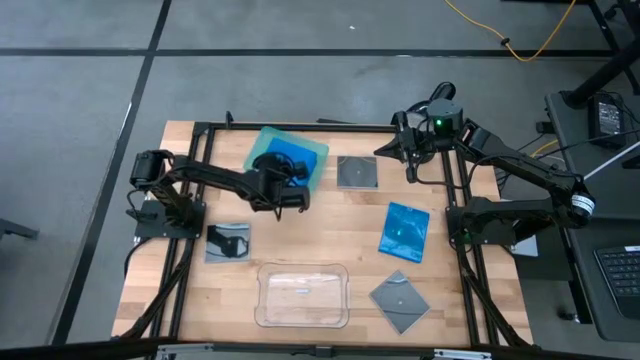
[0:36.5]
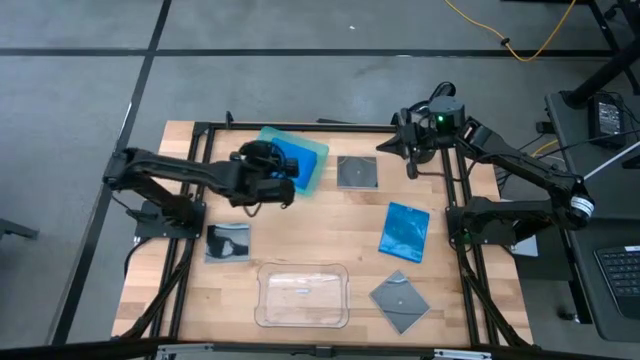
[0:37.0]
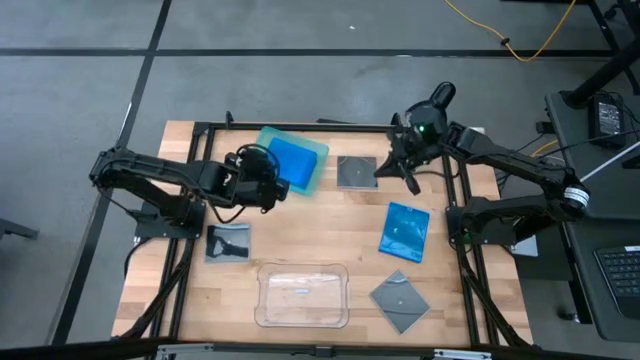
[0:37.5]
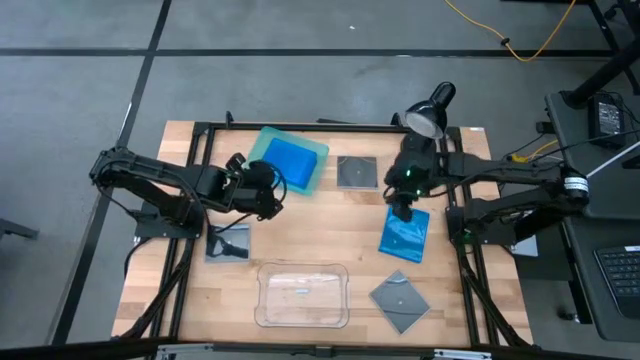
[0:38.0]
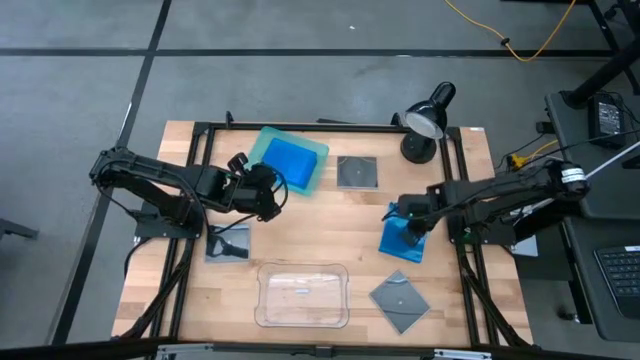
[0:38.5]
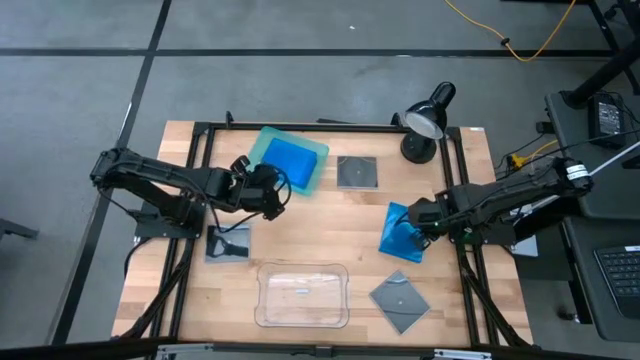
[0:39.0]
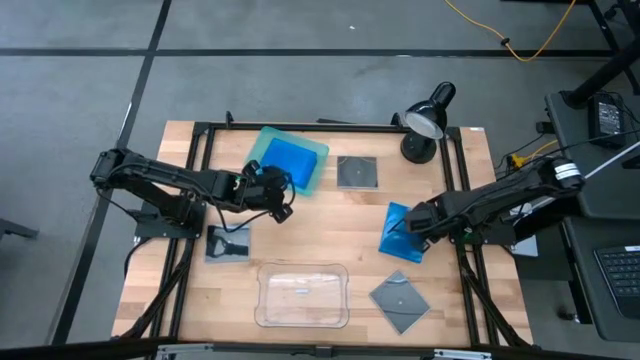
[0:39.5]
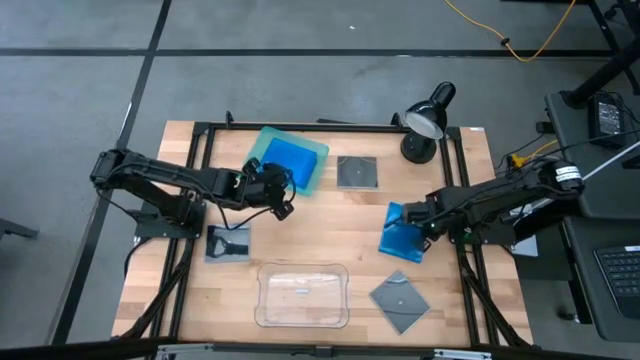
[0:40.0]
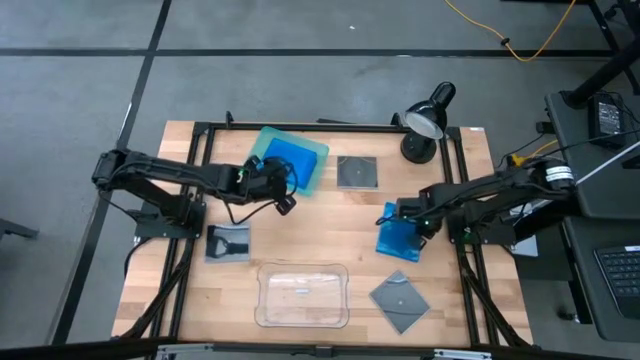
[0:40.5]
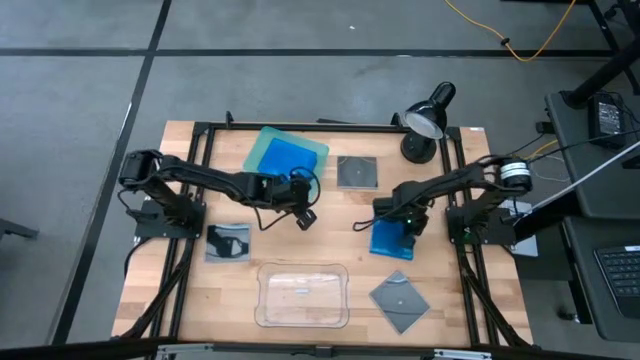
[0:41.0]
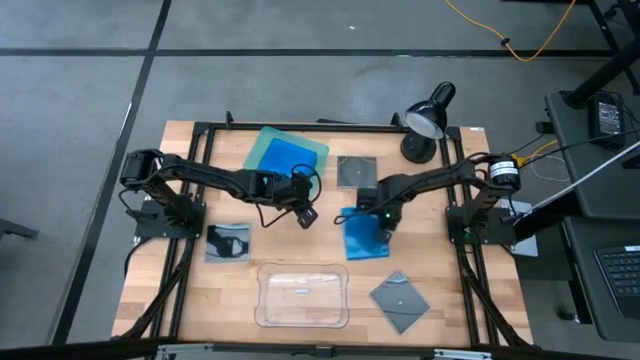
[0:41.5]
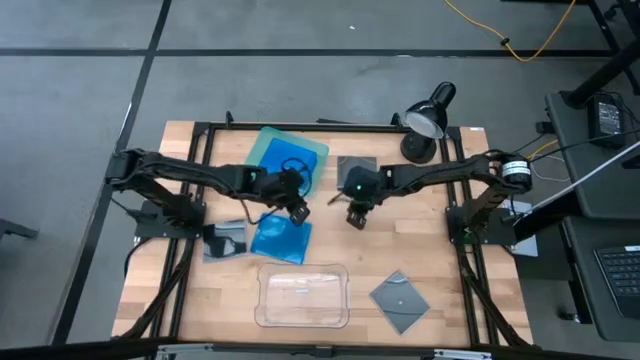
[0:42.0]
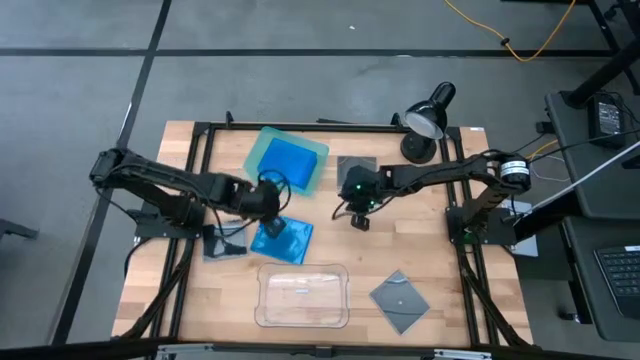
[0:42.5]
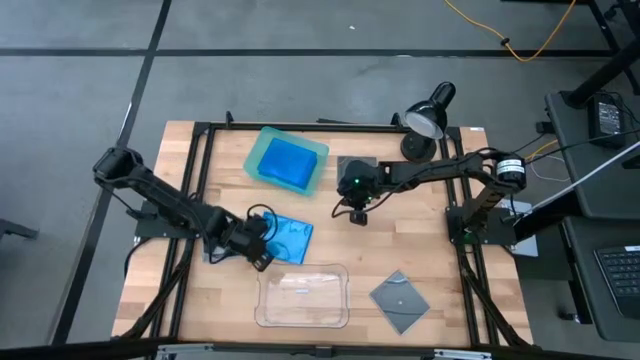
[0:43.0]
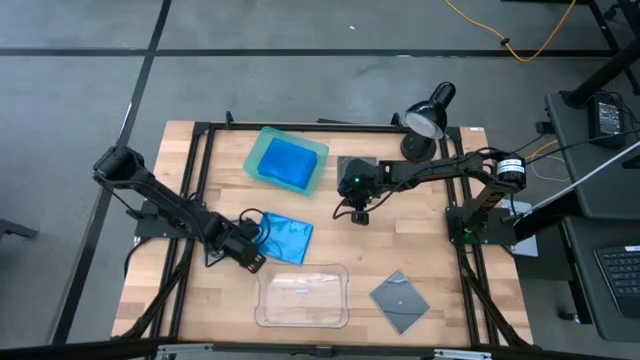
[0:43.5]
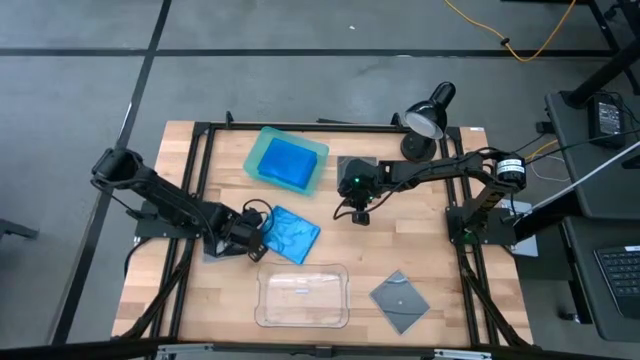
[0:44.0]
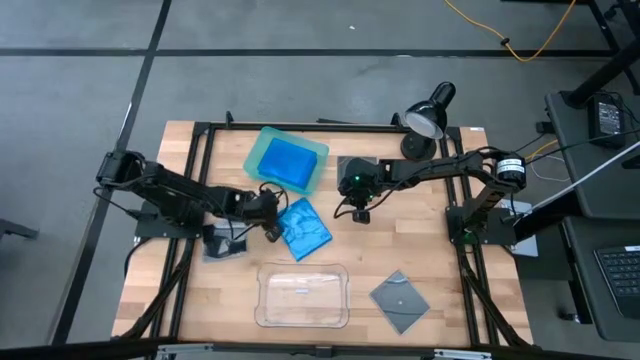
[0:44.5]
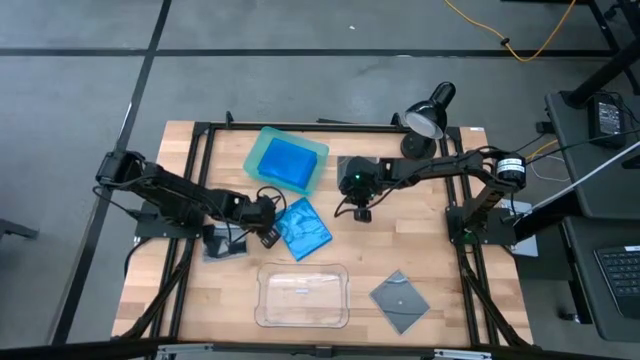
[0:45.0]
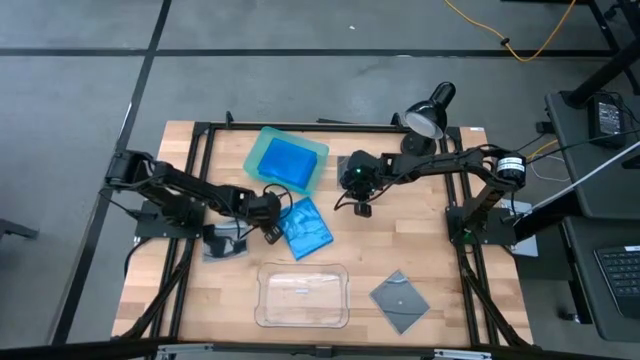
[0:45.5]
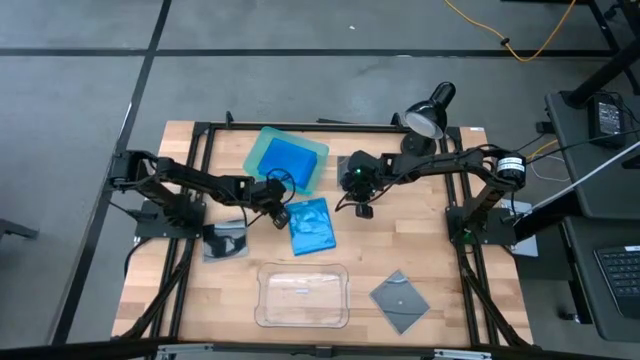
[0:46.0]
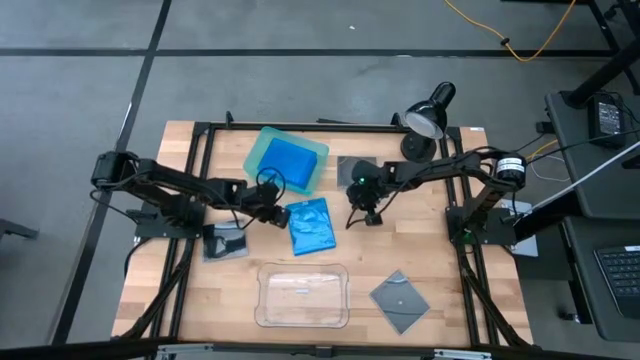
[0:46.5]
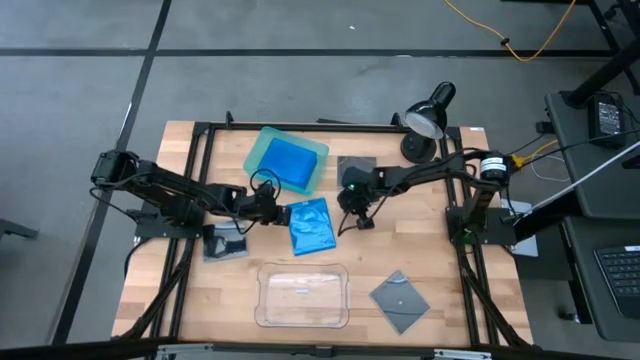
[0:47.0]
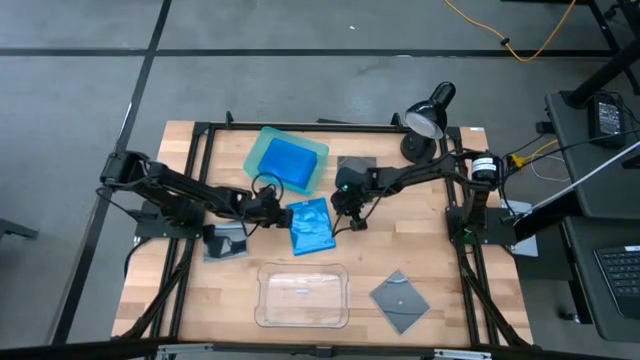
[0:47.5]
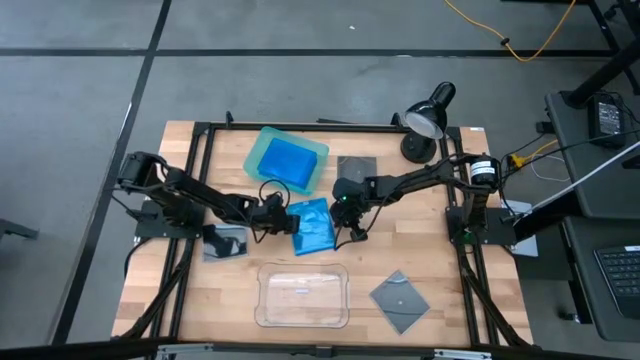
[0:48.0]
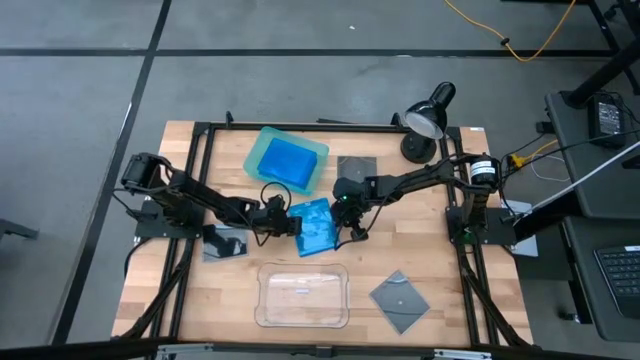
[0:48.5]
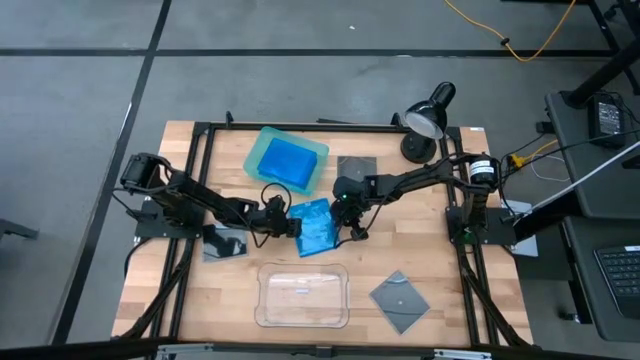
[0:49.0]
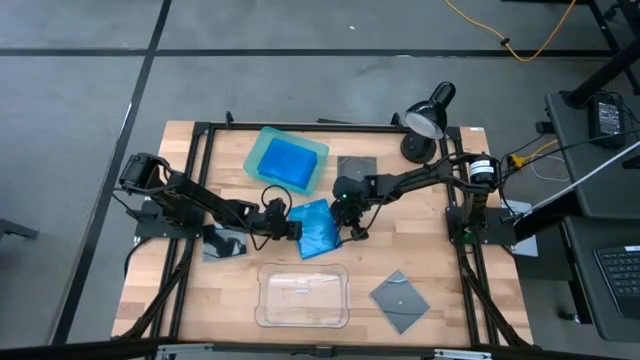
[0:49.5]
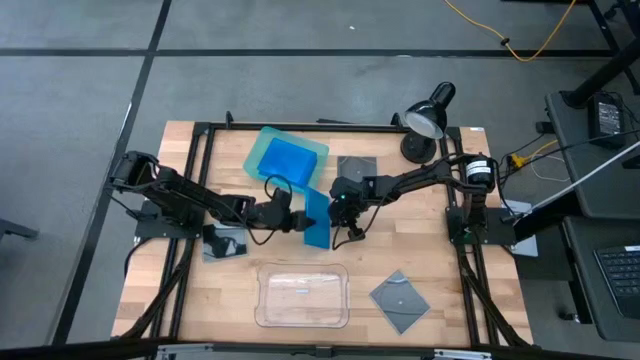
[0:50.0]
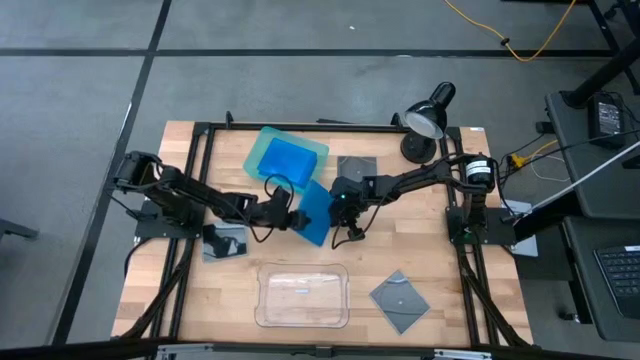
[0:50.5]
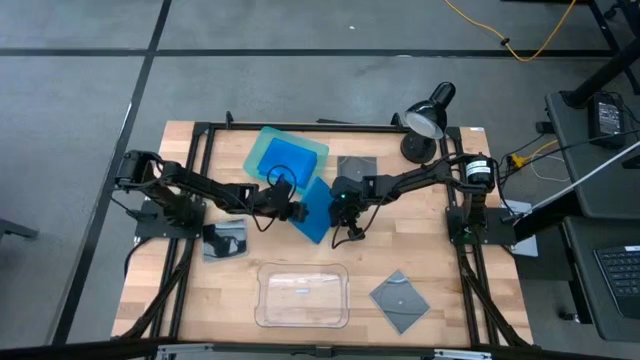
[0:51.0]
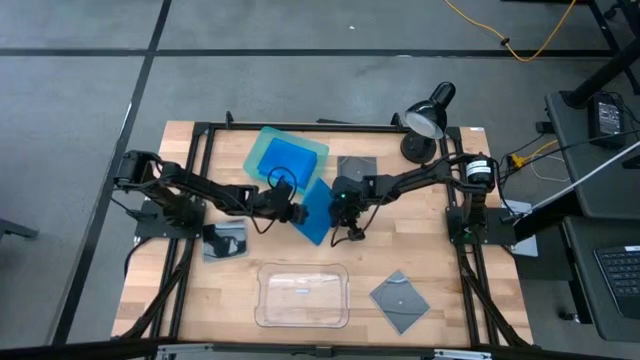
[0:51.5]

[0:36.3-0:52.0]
Task: Pick & place jewel cases by type
Put the blue cd case into the green bin

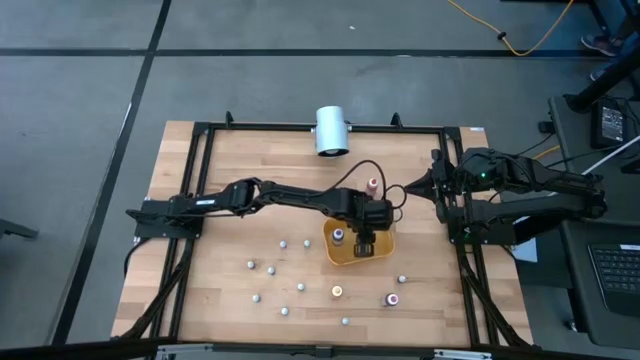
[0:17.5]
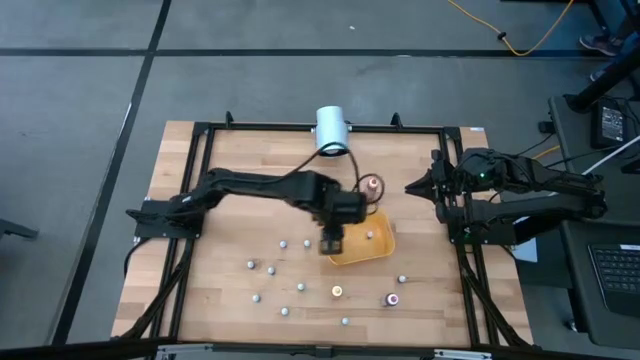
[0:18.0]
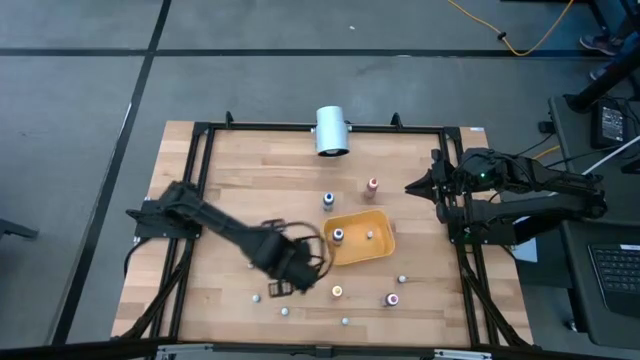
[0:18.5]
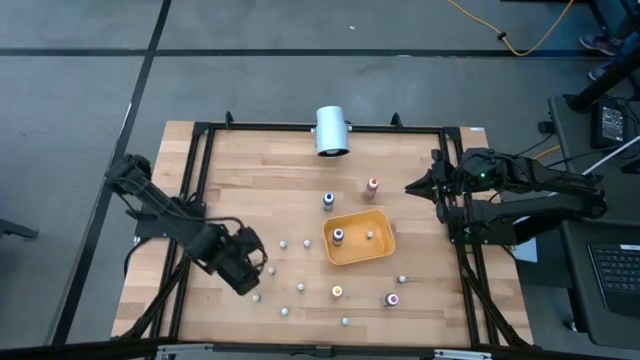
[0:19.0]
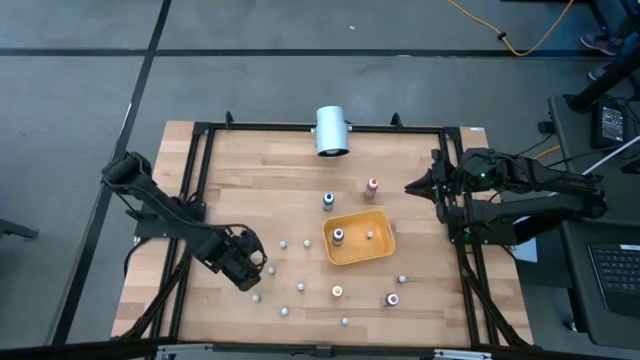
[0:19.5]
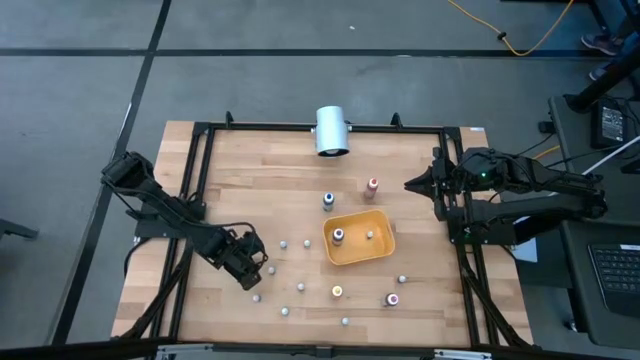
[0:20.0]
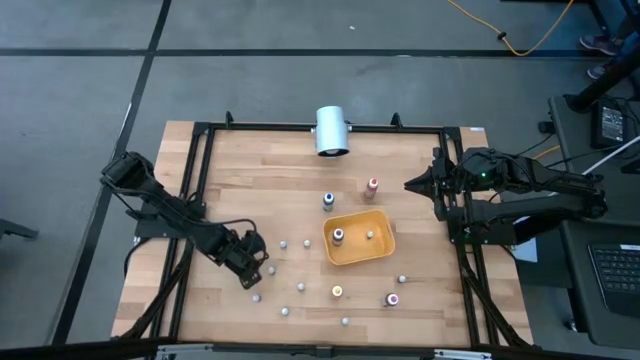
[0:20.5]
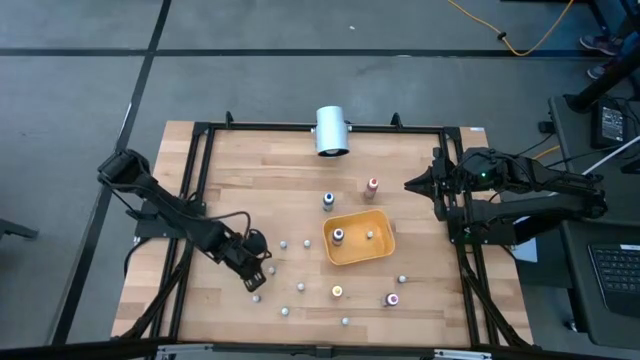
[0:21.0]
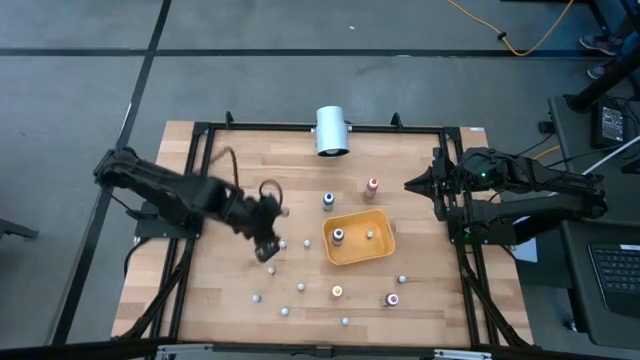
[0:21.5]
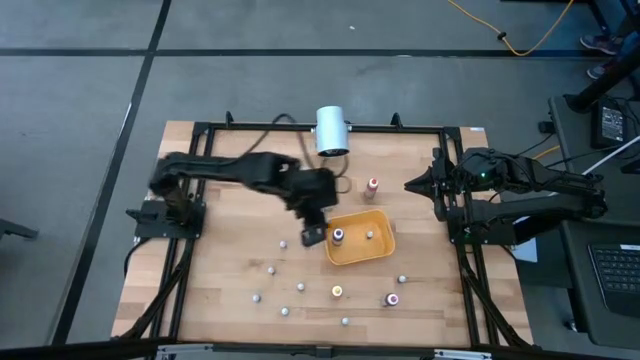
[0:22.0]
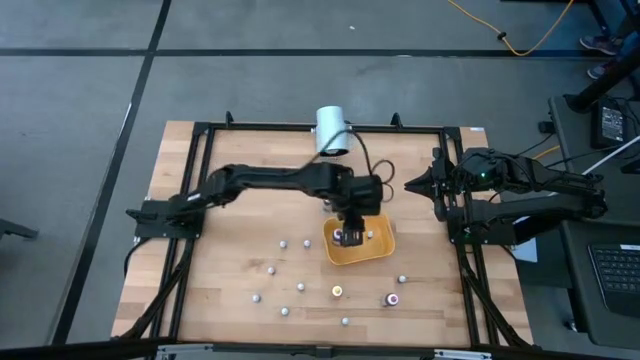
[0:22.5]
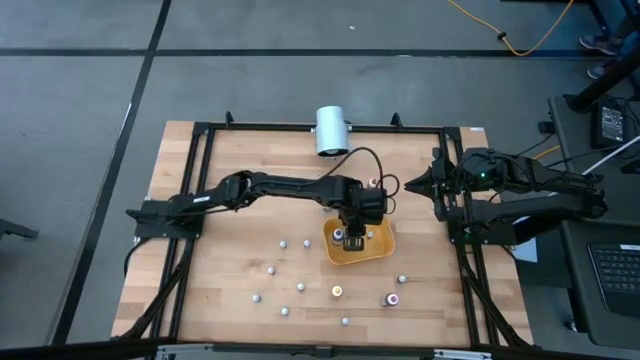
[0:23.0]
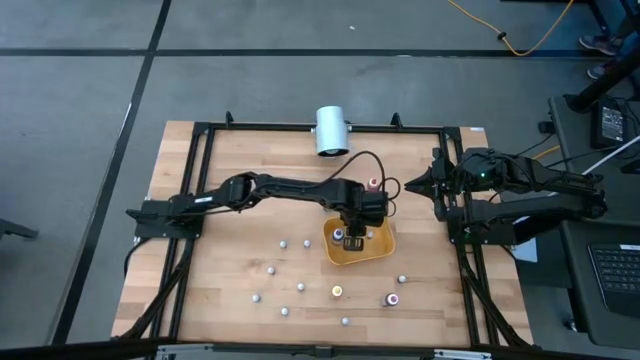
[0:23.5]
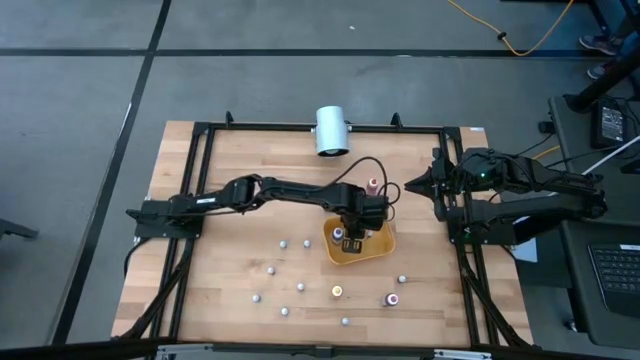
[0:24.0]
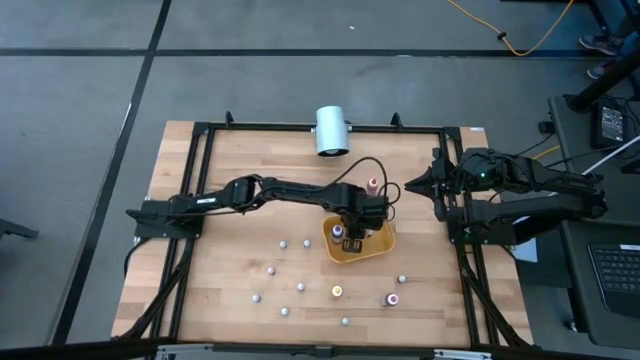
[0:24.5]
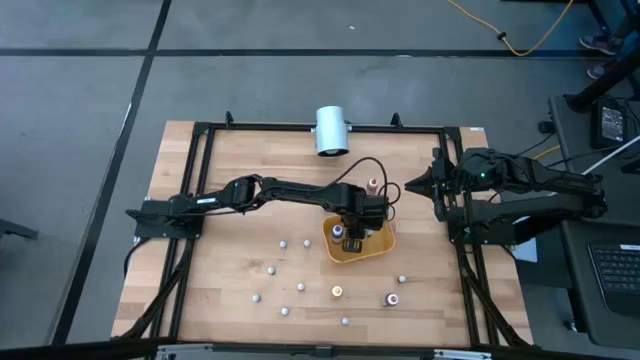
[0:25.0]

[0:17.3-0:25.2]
Task: Pick & Place food coloring
Put the small red food coloring bottle into the yellow bin
